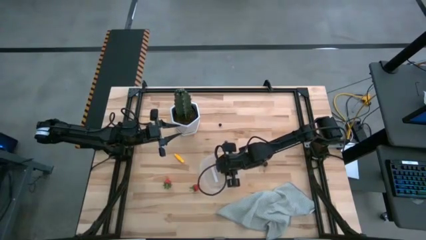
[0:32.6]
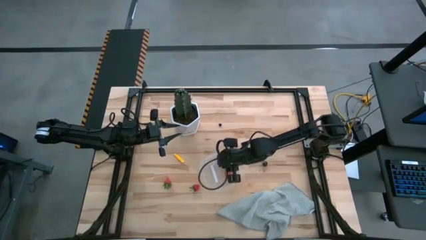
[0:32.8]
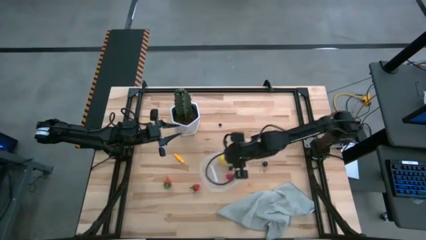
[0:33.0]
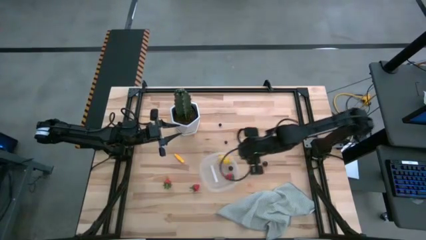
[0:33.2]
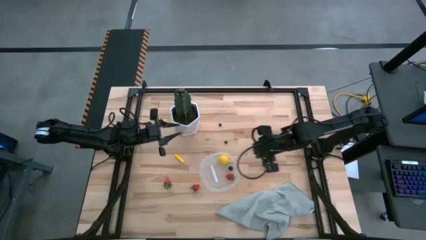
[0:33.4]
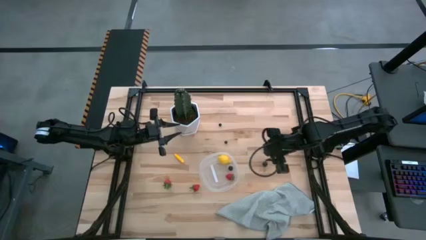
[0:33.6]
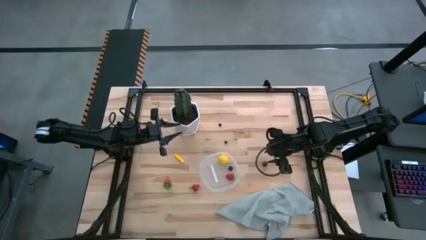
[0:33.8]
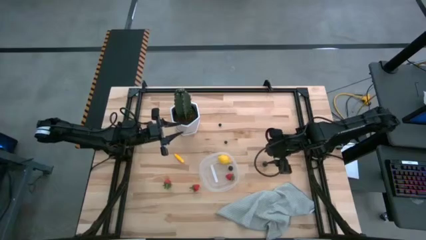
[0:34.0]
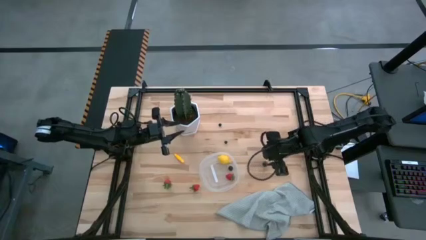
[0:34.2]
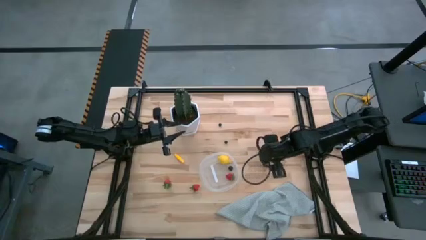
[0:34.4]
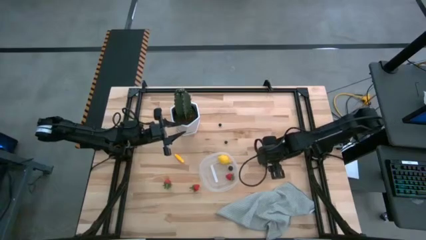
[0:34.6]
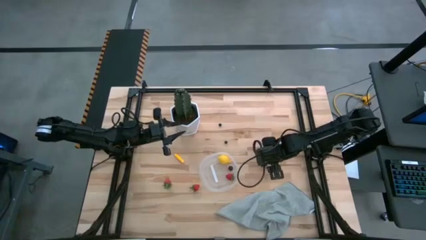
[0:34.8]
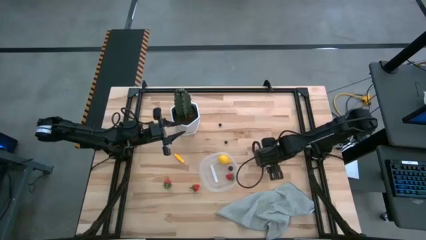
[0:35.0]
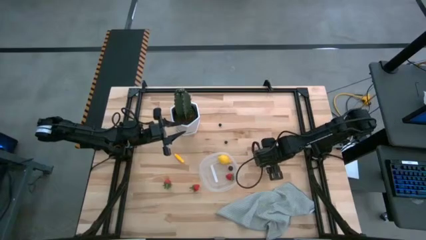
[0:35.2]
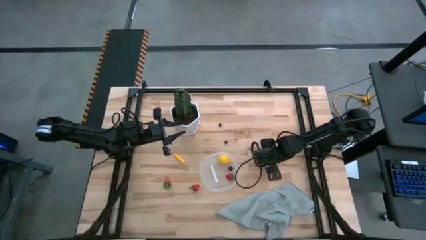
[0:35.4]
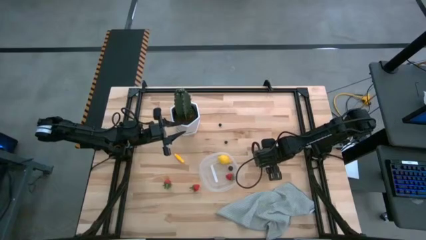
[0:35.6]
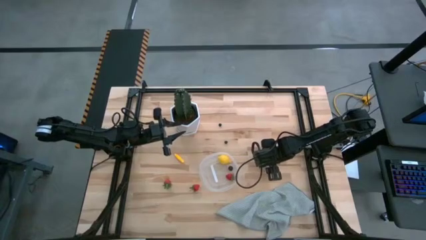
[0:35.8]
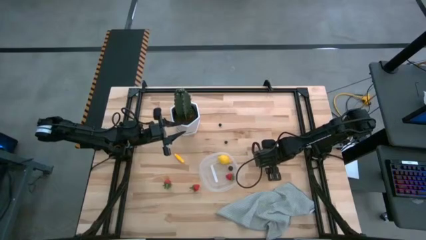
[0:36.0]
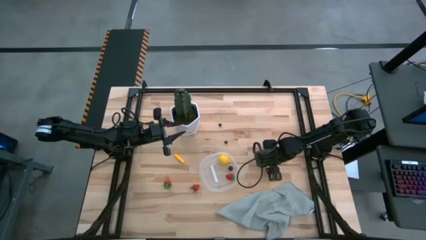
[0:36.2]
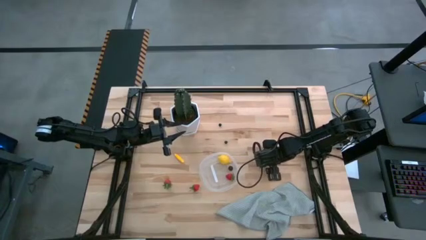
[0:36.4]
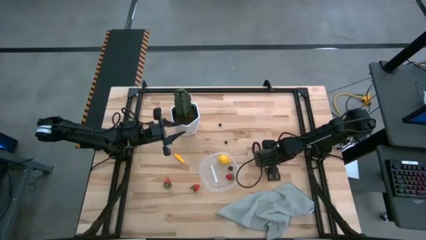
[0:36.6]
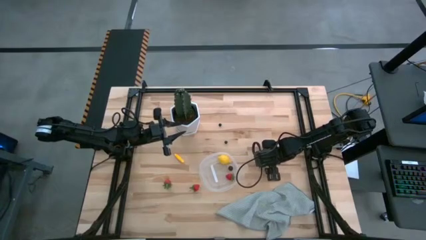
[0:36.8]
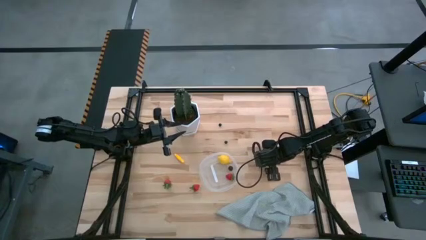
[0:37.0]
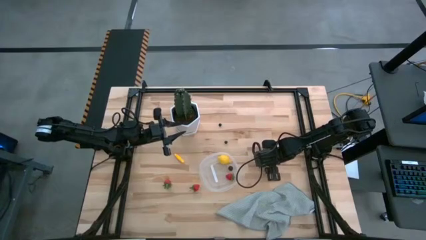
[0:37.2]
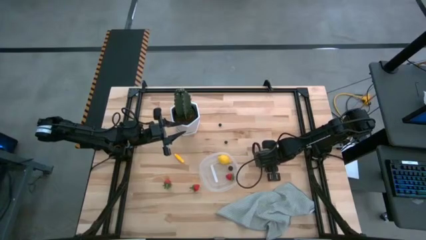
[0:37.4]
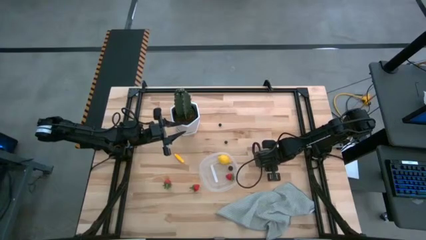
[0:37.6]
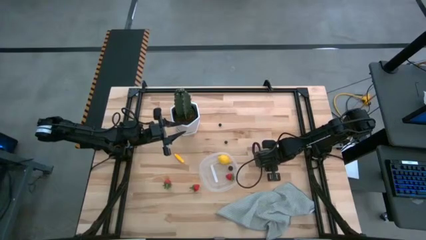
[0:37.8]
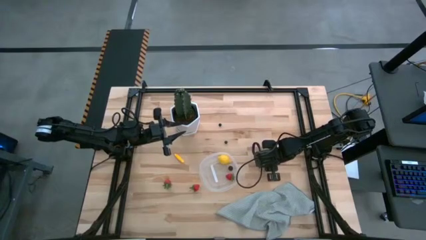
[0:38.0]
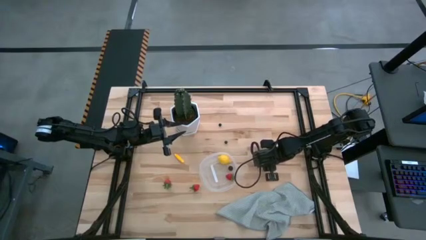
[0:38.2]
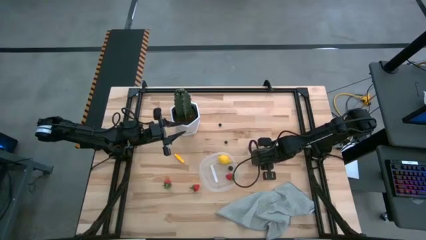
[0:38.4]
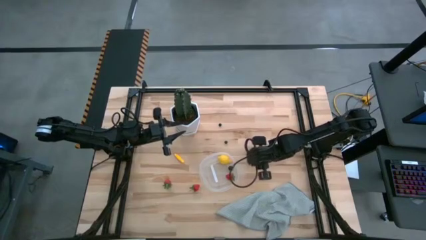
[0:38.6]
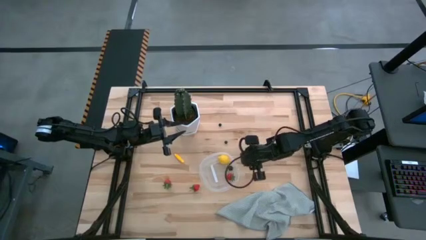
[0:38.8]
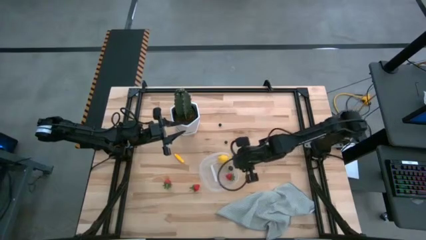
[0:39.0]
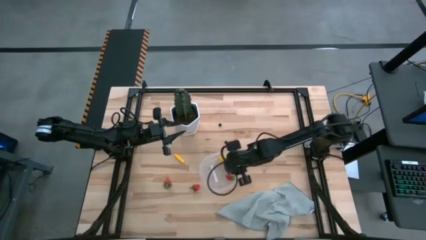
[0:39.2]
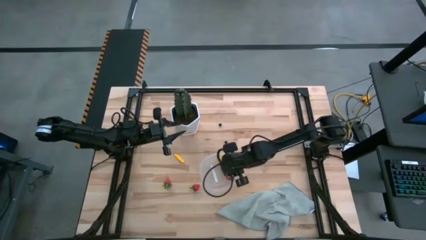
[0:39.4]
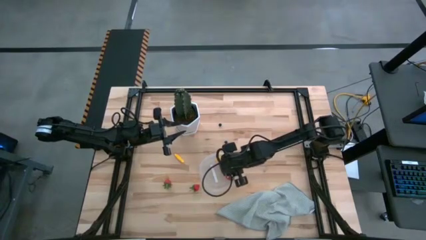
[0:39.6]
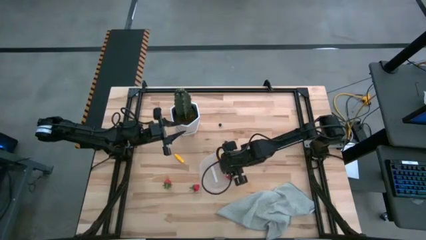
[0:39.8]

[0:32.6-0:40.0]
Task: Pick and placing Produce into tupperware
Put the black cherry into the transparent container

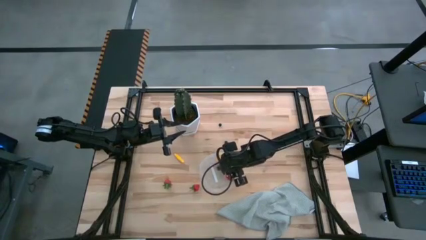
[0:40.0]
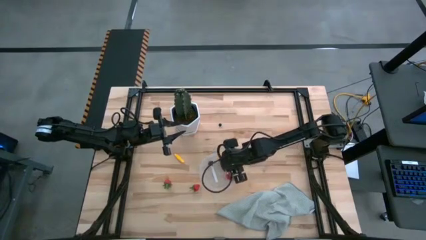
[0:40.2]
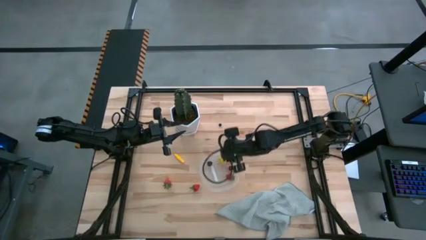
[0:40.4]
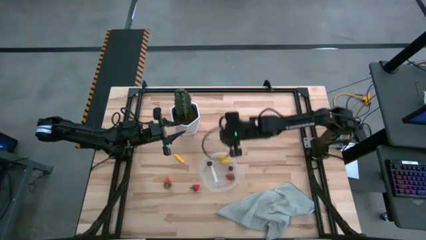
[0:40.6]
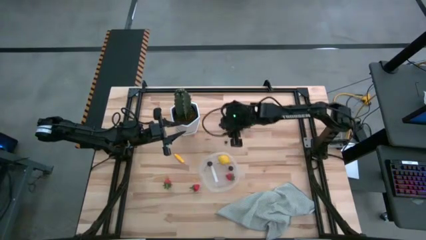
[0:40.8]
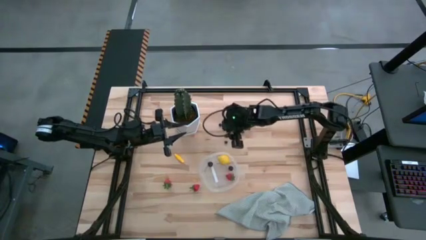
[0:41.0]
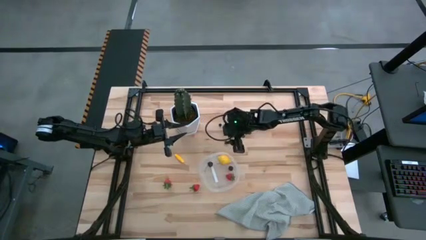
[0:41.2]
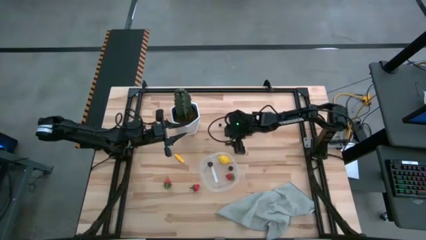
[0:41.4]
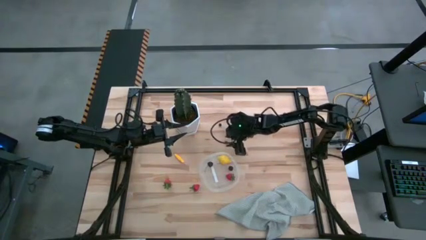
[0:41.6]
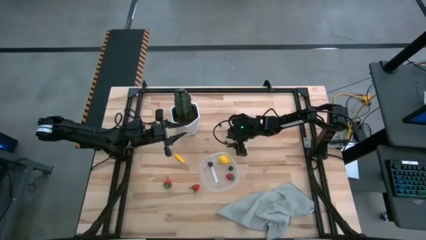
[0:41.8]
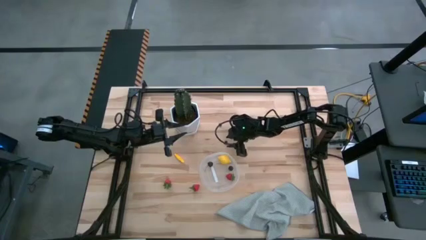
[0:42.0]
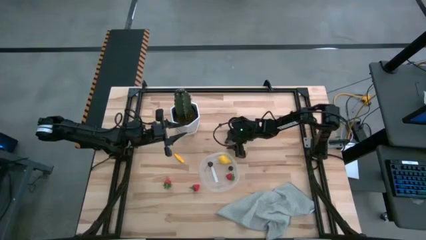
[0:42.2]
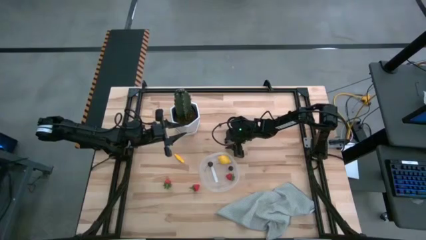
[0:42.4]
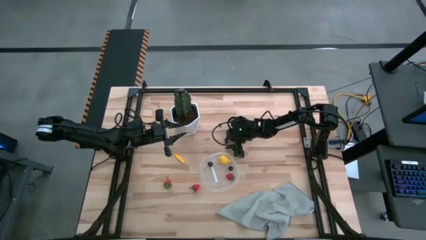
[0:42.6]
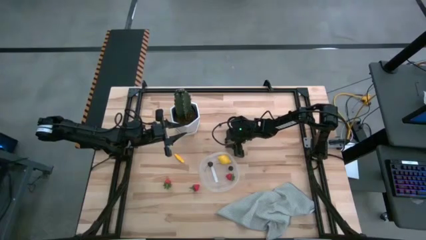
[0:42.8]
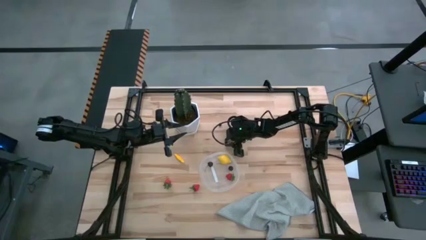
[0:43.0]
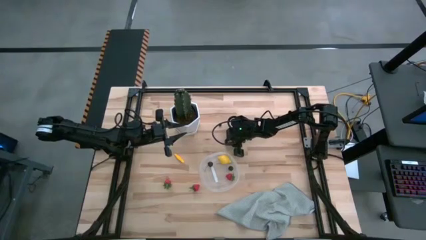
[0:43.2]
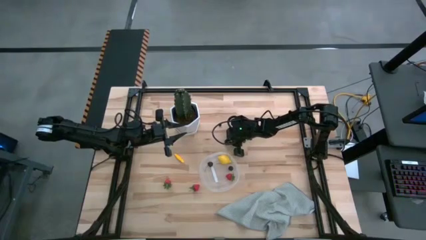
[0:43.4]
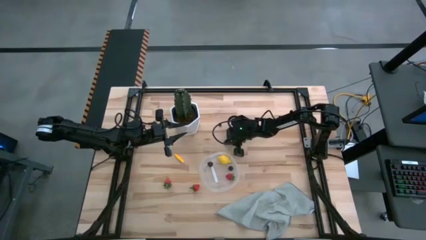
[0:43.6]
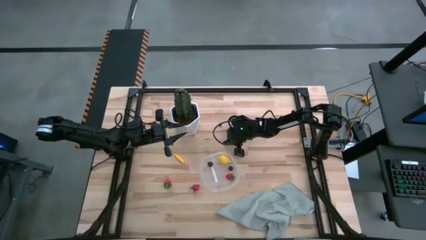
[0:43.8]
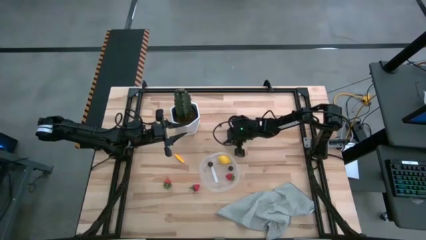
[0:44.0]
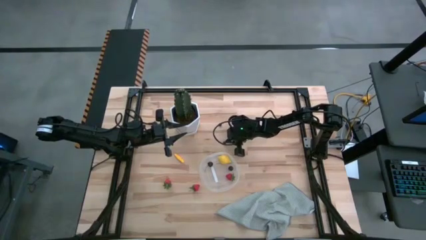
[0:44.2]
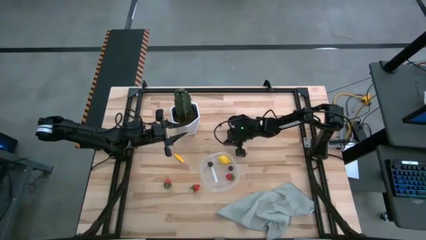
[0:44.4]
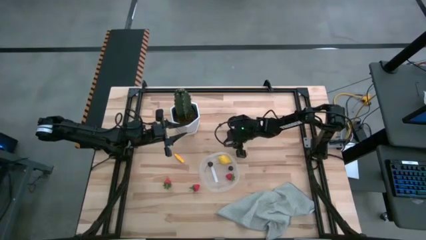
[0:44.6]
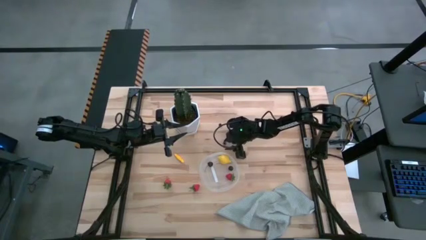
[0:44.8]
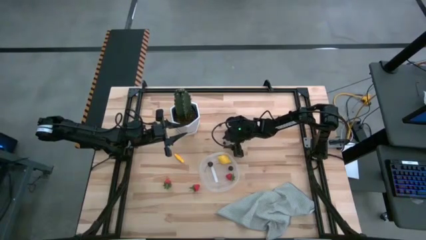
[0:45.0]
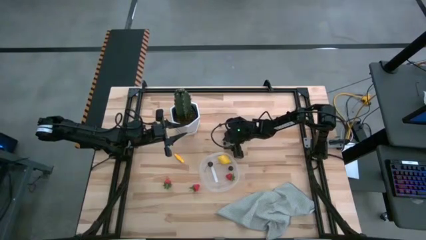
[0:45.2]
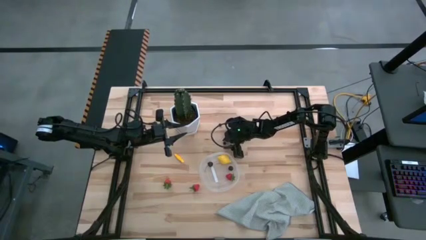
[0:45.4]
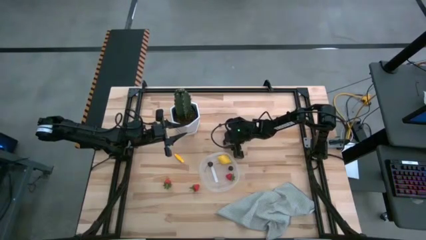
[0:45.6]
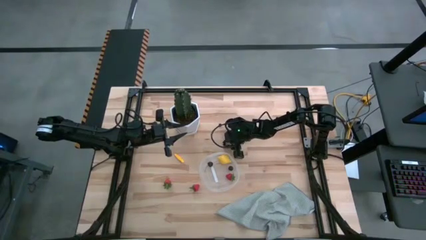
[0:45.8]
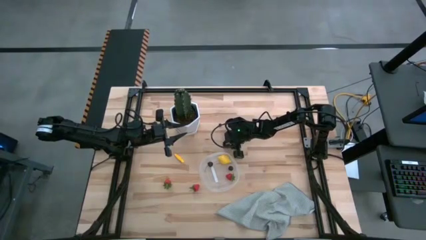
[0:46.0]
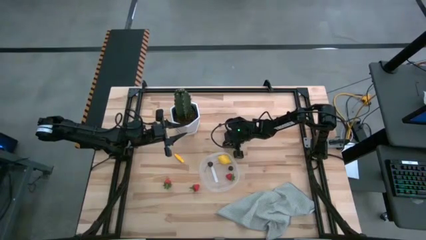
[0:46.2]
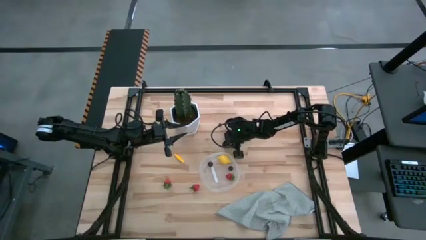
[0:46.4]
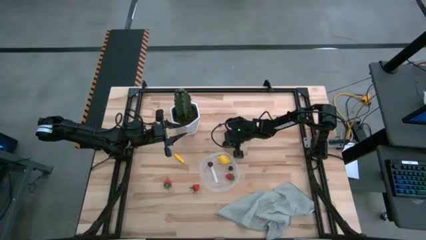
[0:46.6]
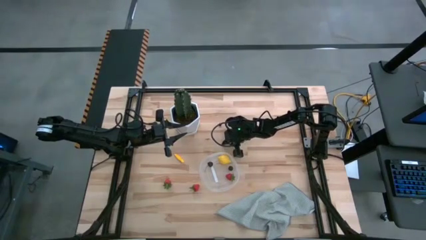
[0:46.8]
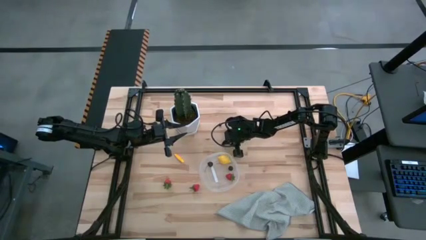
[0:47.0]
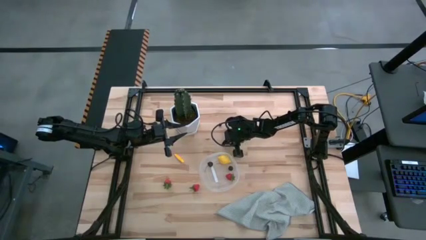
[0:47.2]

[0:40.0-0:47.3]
Put the bottom blueberry into the transparent container

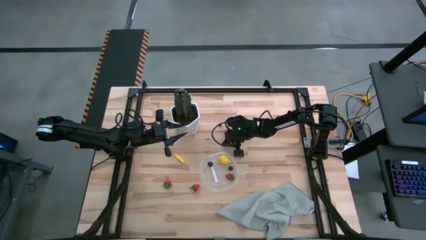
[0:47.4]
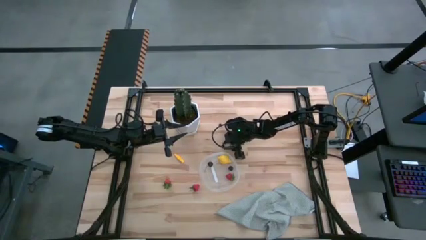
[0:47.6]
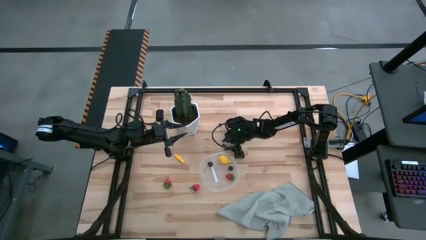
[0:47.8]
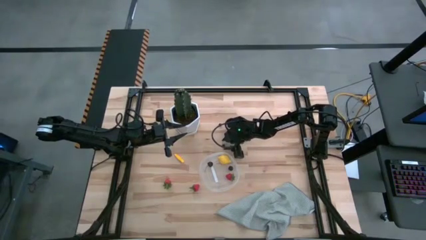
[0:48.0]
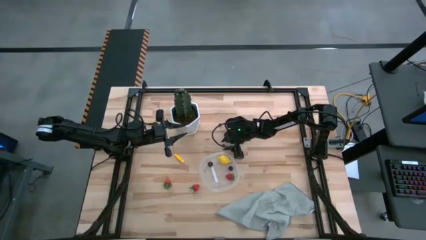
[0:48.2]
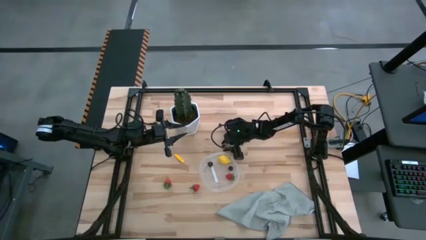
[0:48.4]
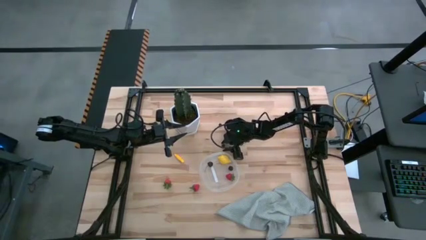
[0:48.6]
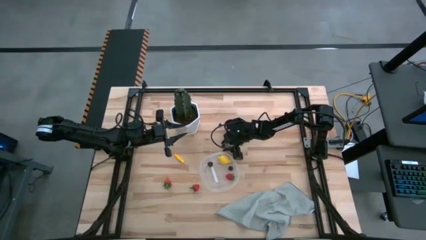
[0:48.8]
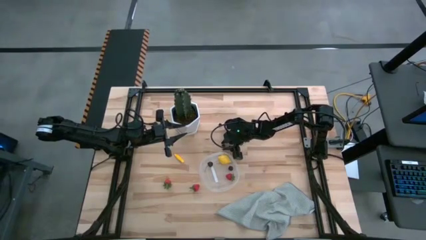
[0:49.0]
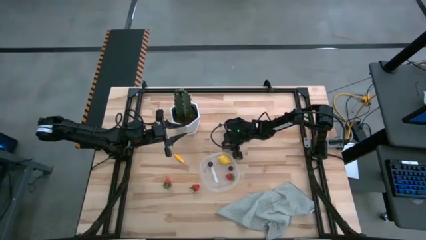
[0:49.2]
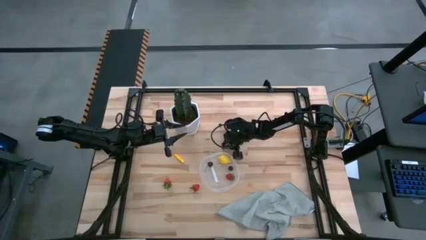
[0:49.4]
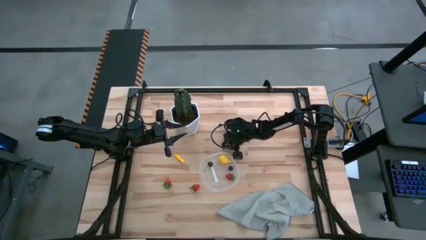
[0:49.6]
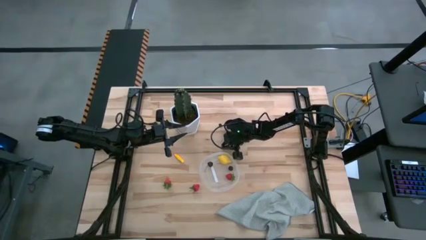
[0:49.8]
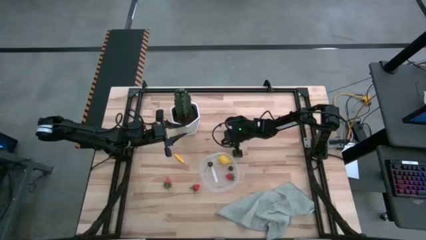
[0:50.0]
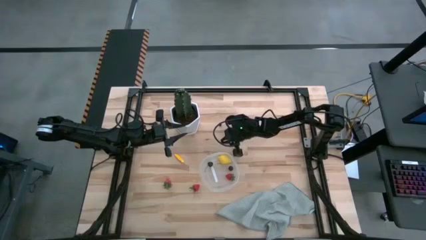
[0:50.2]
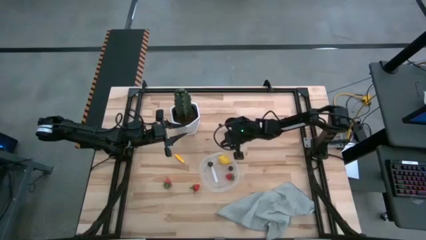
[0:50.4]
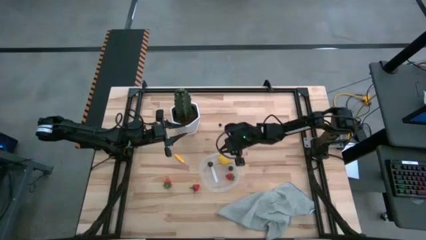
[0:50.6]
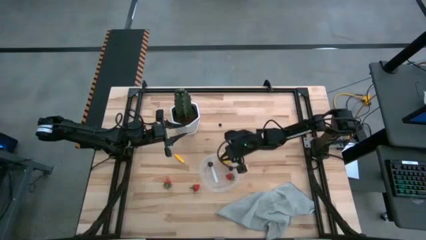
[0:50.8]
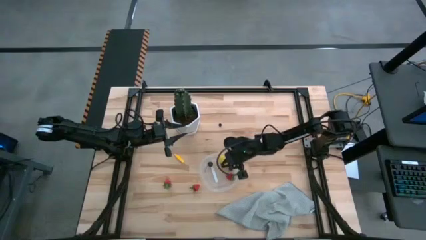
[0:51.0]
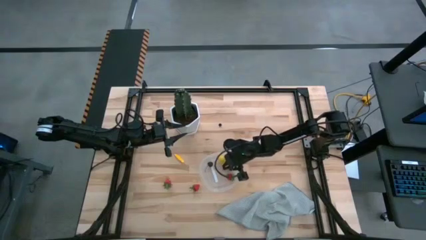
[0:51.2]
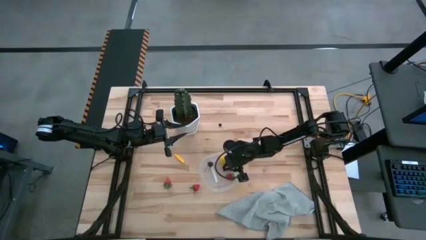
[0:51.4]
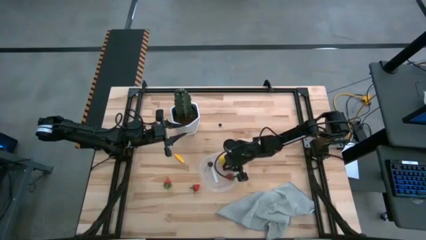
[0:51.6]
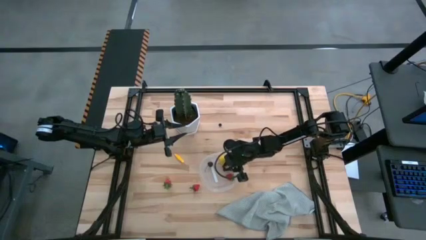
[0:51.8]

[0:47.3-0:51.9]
Put the bottom blueberry into the transparent container
